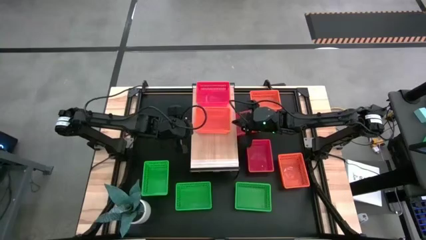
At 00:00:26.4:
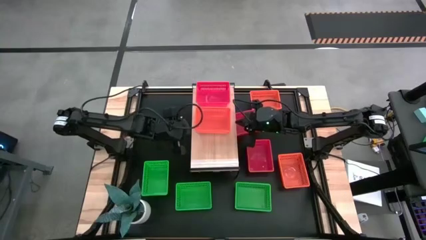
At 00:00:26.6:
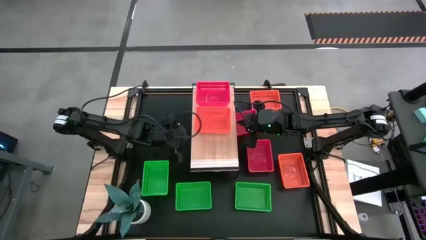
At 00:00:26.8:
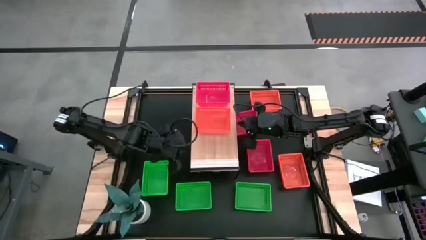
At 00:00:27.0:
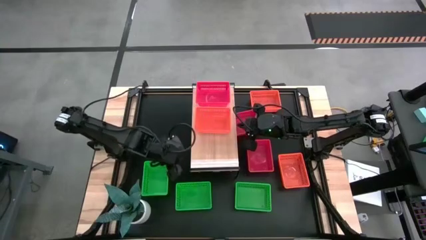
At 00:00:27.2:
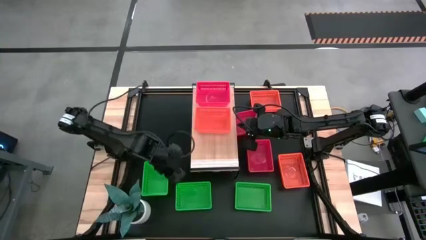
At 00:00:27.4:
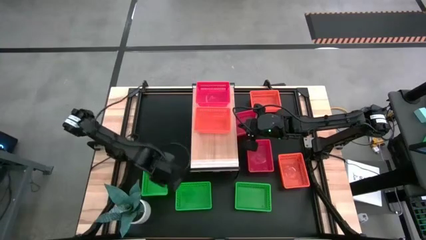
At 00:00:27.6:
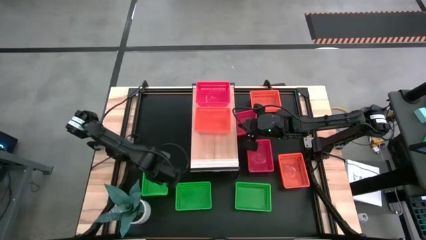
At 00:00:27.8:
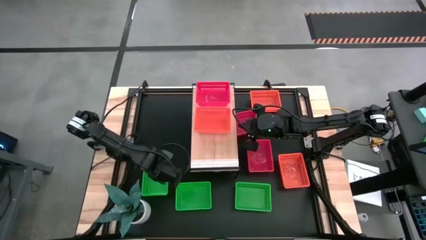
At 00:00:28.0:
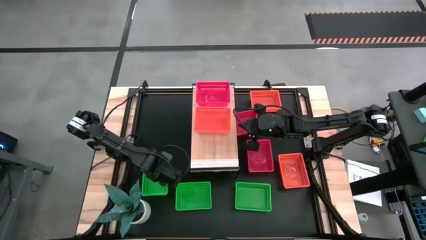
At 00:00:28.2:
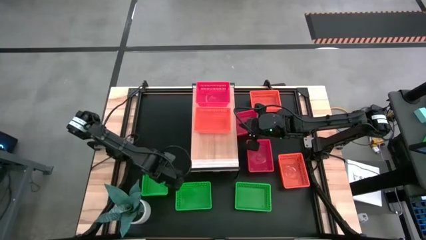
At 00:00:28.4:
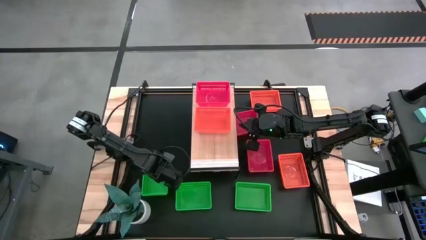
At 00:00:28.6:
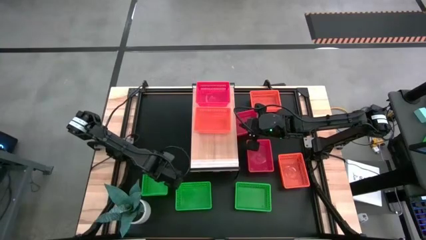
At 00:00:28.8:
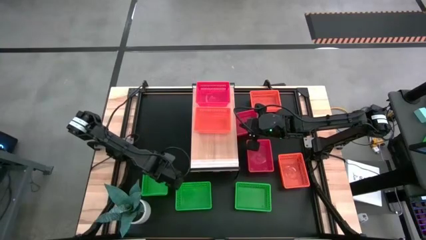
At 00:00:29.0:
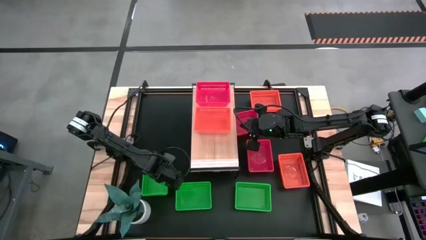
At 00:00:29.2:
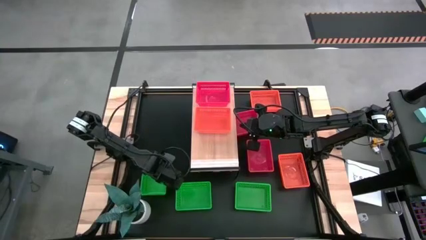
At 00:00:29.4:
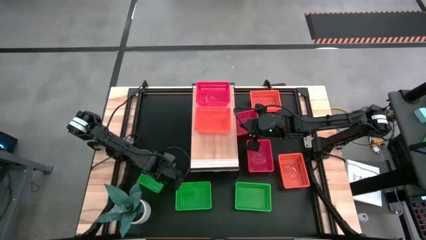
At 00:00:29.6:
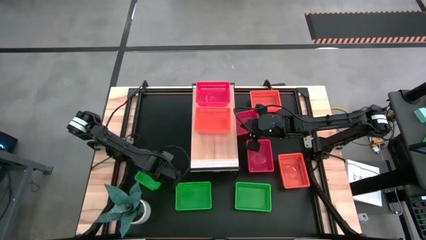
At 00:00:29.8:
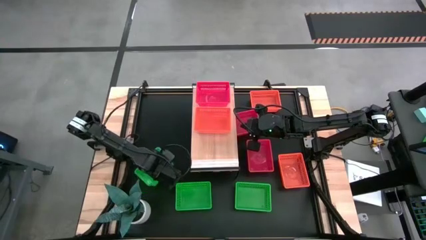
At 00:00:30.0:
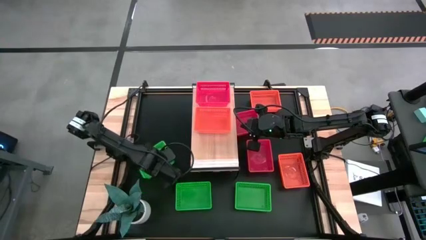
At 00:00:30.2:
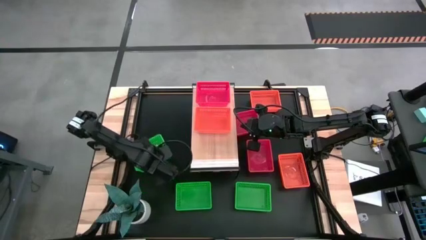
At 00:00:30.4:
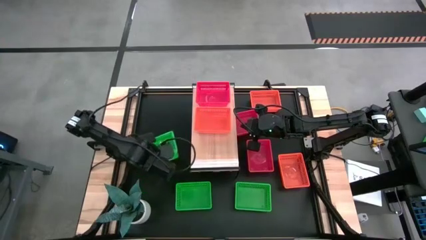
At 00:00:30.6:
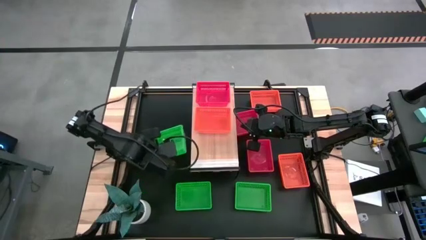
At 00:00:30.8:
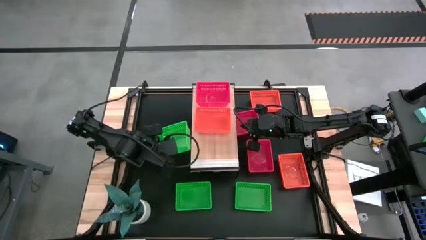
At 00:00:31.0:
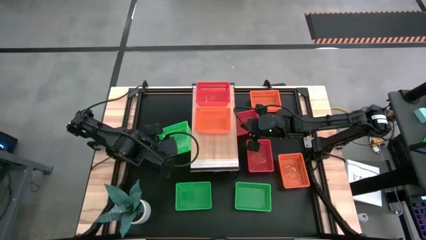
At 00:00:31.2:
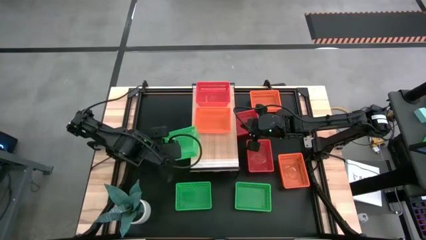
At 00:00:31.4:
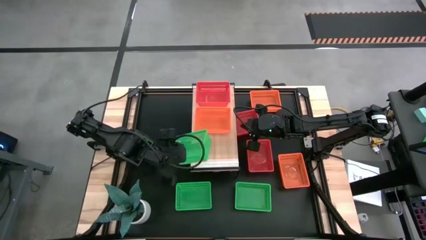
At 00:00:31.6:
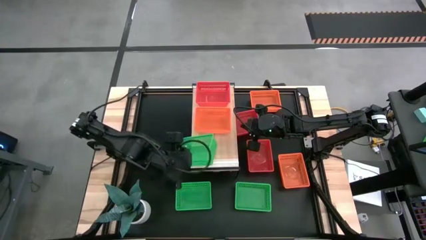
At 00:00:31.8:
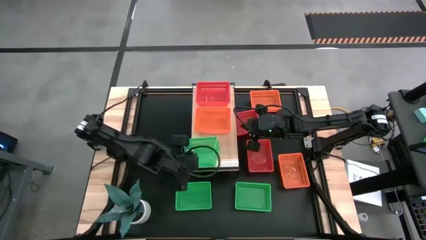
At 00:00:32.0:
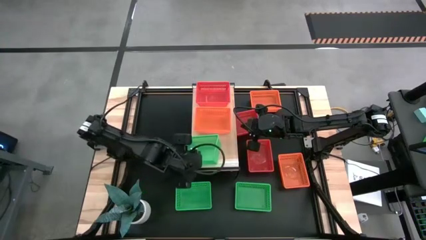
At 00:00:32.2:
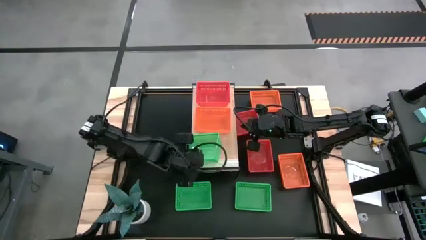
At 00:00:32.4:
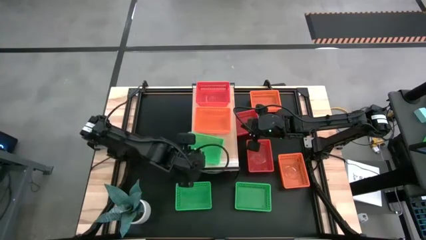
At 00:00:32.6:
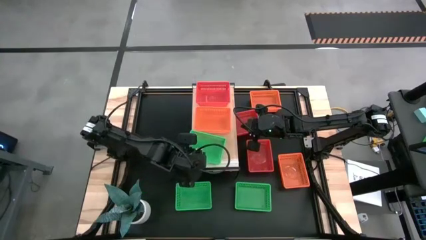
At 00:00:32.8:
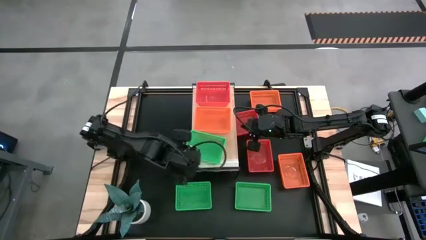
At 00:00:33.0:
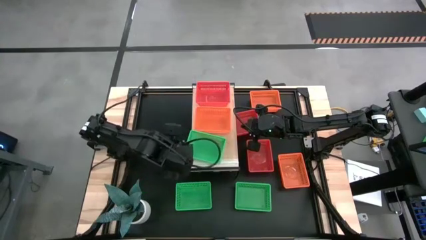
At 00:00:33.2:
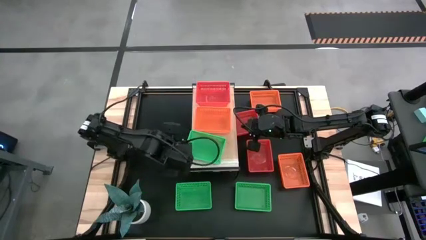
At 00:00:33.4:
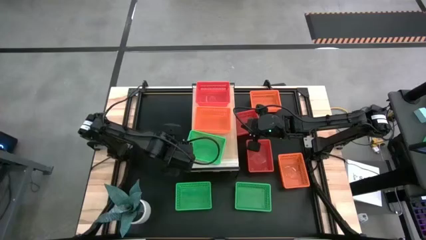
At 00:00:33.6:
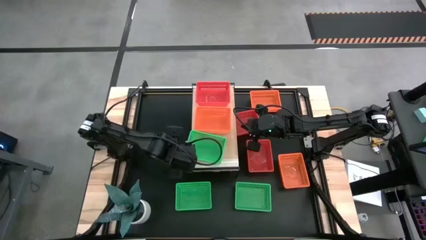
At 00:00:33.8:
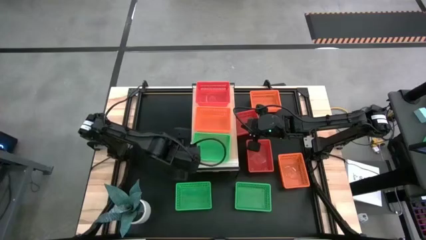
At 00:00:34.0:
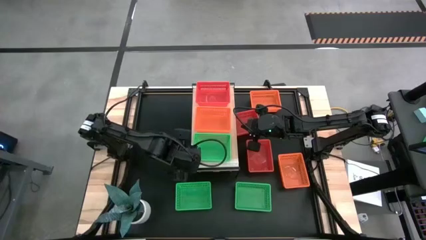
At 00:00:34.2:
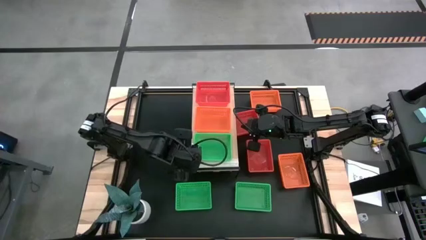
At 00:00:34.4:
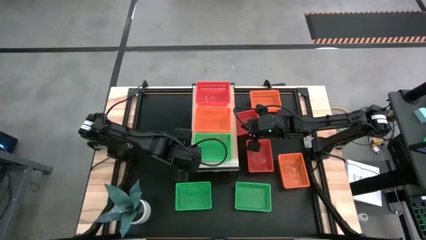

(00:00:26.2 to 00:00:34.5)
Task: Stack baskets on shelf by color
Put the top green bin on the shelf

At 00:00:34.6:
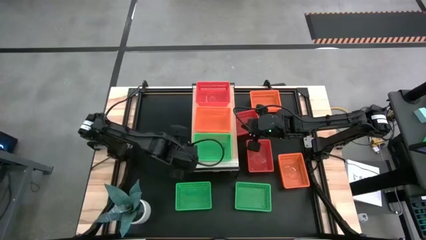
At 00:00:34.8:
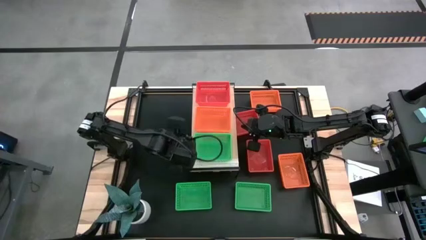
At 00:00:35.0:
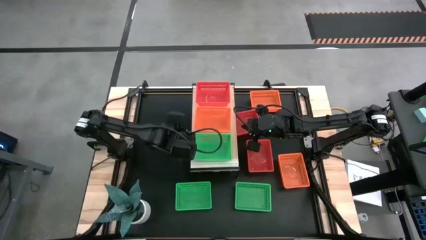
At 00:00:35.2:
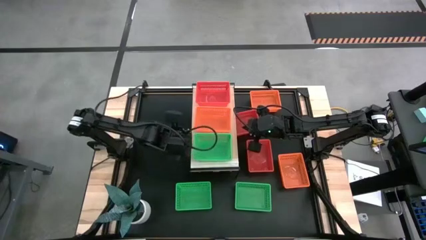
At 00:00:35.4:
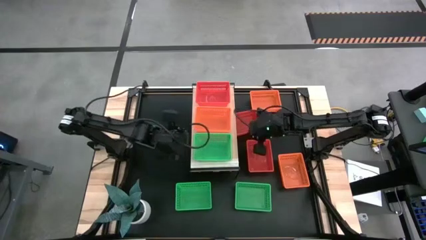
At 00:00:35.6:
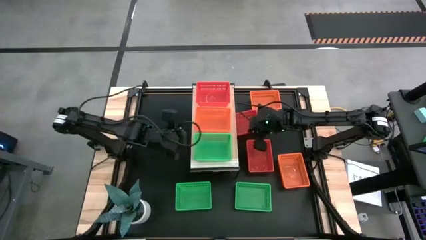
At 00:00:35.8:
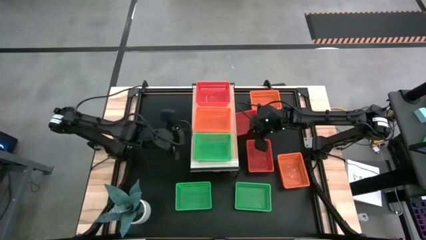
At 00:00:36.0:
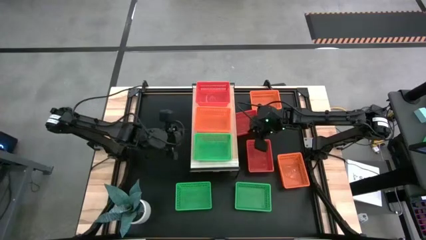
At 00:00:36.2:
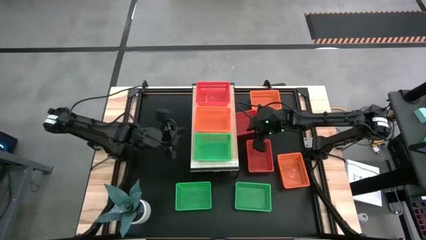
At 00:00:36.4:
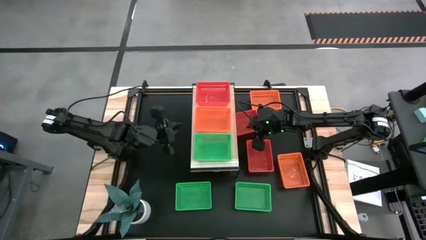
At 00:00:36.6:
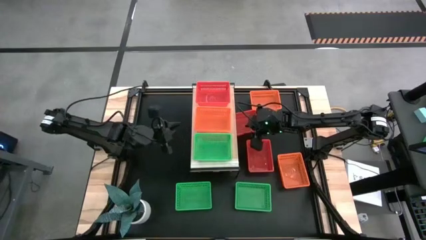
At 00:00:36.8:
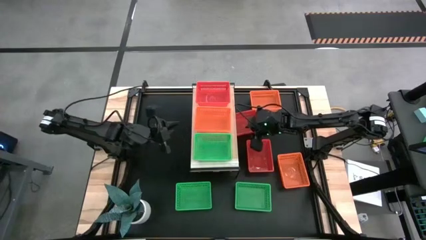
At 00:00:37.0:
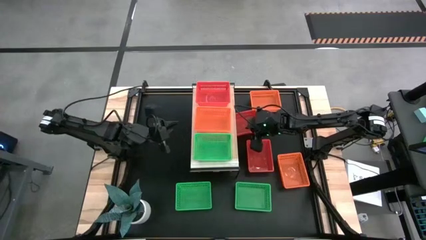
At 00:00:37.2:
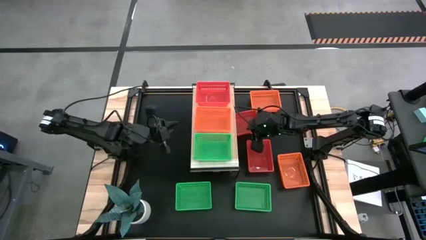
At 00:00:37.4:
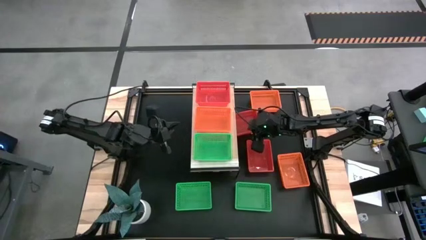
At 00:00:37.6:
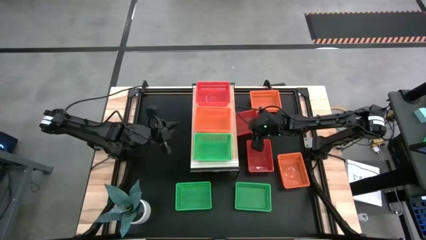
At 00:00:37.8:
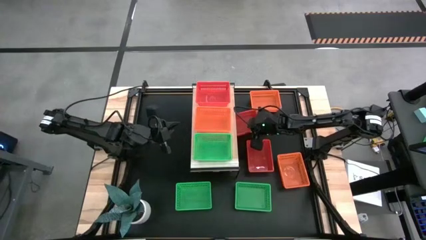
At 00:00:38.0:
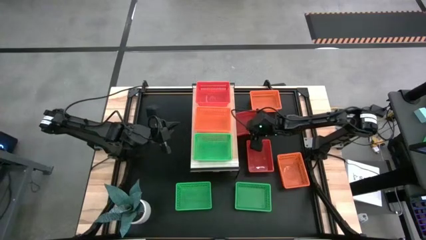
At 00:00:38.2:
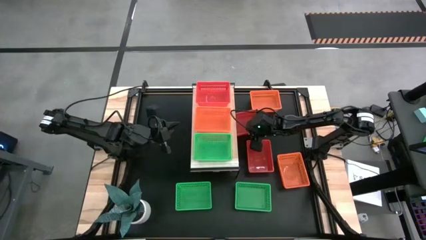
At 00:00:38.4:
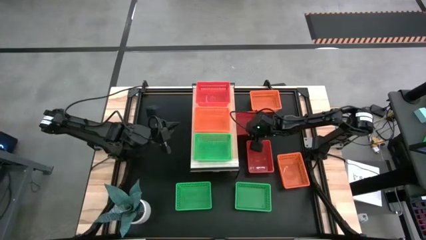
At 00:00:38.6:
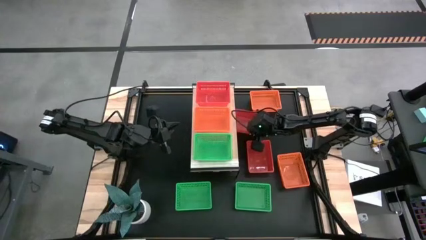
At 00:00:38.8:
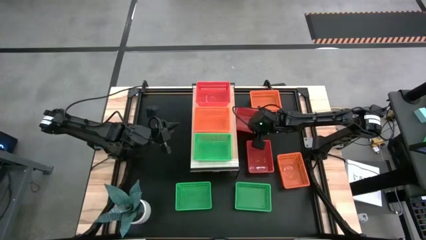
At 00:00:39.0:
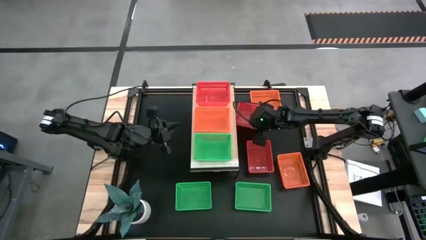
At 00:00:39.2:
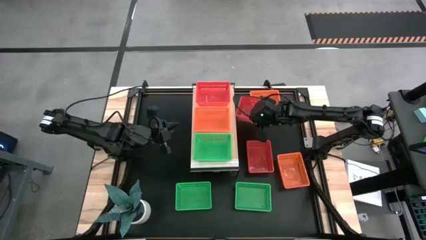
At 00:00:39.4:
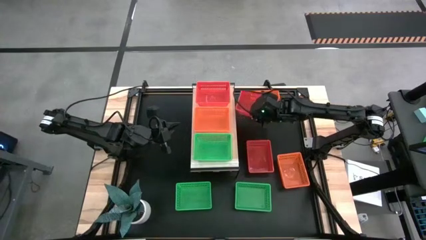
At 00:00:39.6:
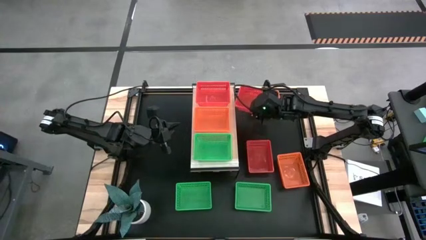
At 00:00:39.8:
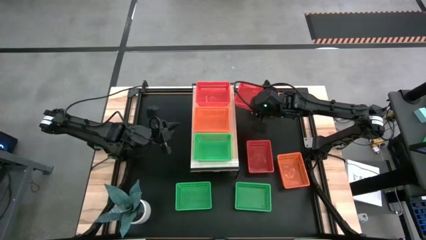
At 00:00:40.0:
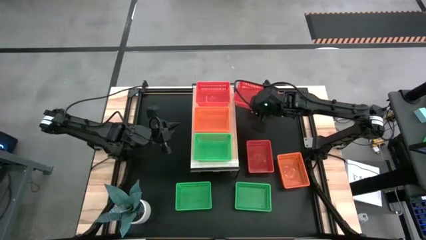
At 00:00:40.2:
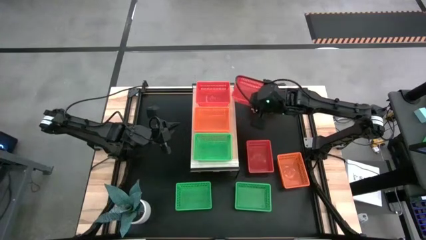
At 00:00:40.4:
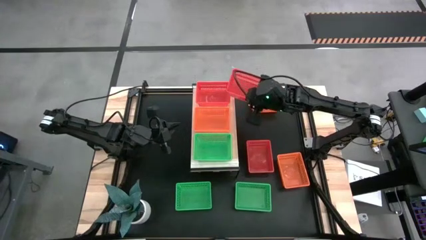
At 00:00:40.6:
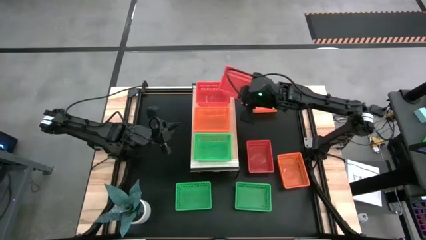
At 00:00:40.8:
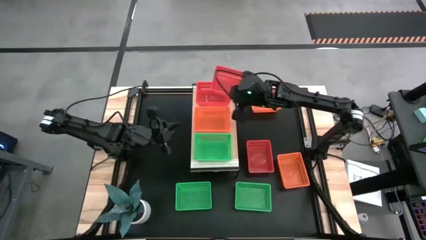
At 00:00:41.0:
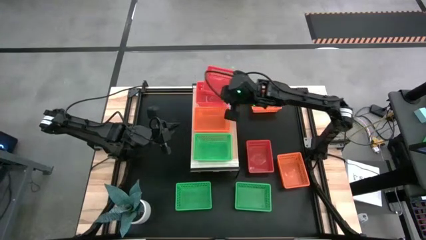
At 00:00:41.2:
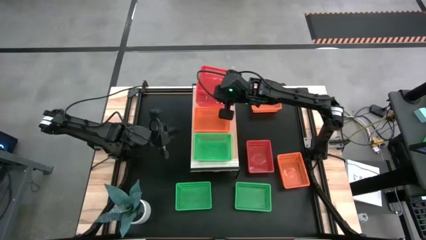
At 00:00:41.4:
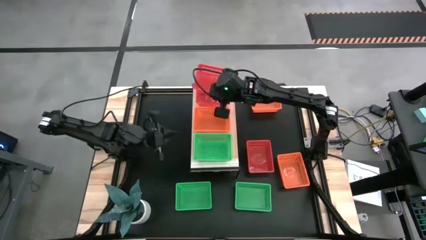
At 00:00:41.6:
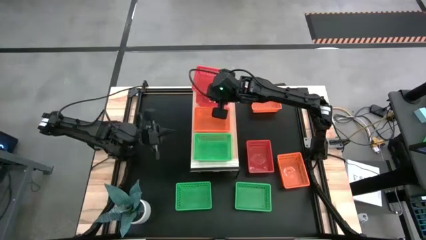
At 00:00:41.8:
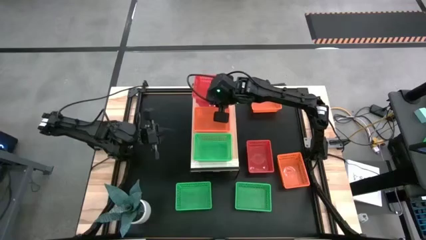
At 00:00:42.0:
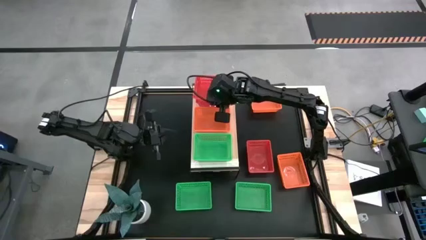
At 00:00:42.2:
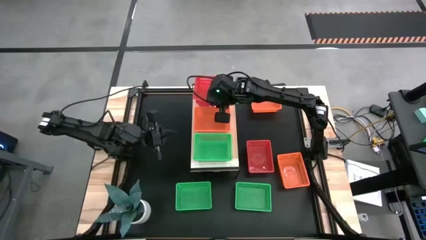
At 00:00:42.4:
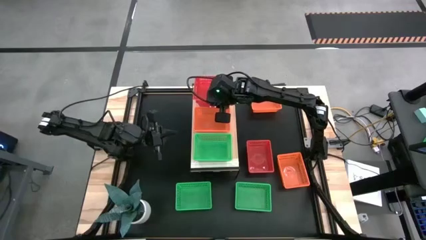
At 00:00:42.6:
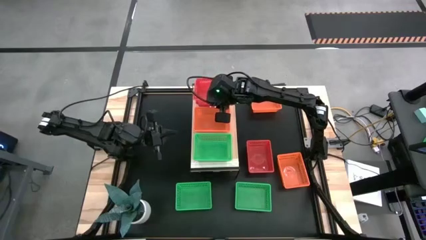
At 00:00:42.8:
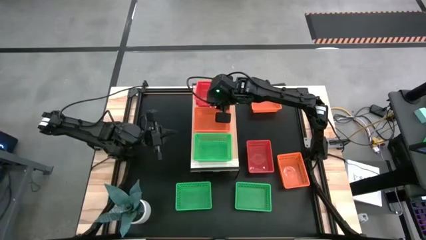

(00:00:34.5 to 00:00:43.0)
Stack the top red bin on the red bin on the shelf

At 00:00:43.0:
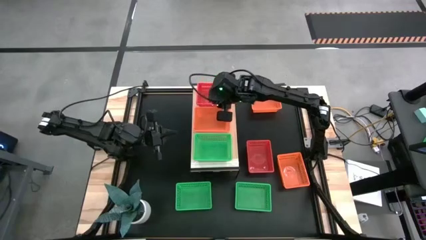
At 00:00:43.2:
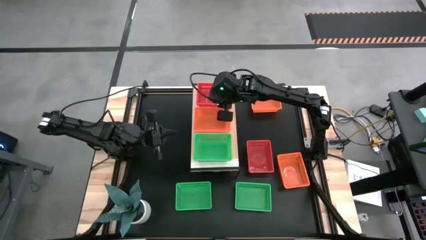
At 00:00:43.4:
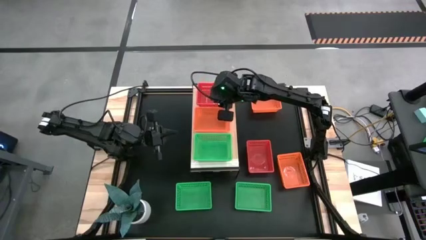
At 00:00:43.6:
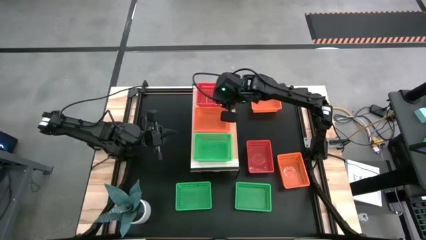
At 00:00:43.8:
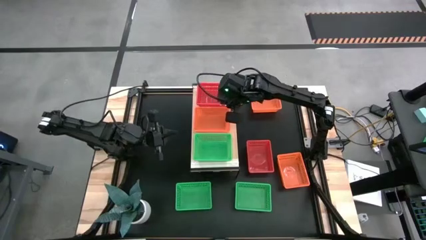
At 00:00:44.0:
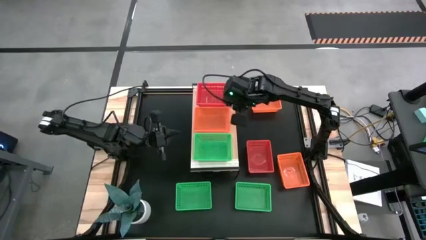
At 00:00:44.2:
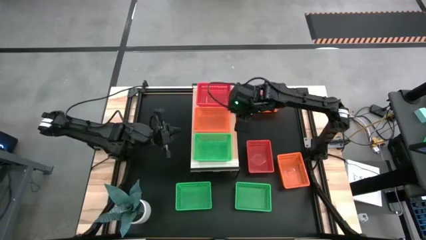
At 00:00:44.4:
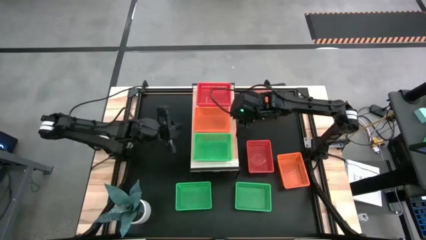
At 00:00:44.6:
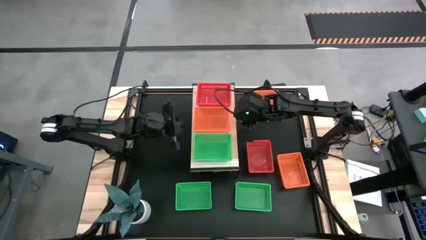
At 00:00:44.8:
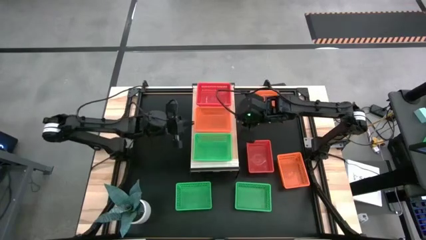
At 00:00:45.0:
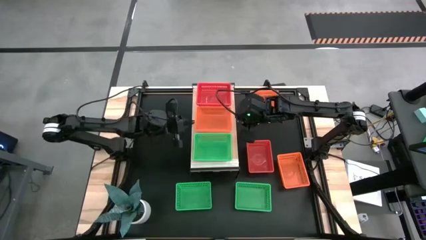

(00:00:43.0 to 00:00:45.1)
Adjust the orange bin on the shelf
